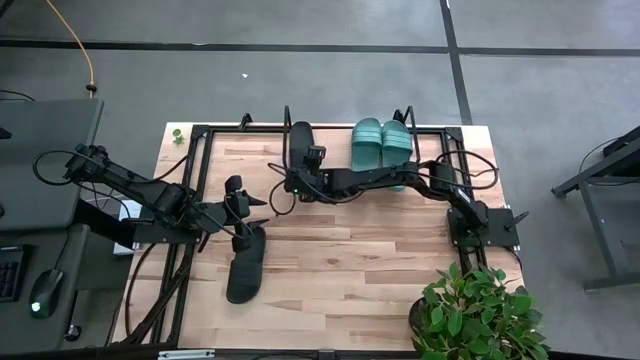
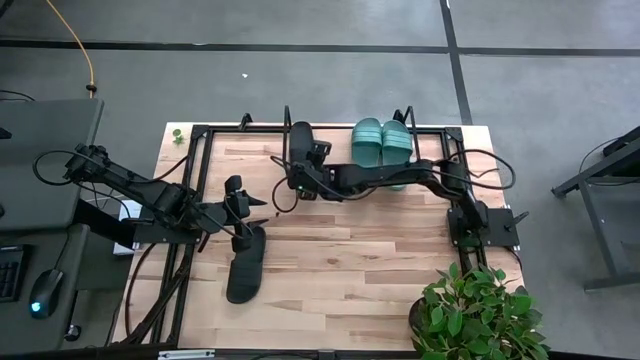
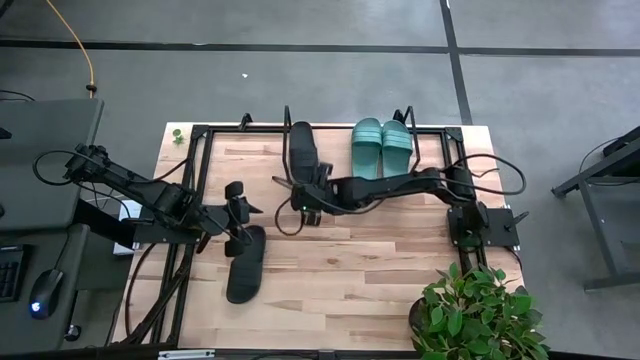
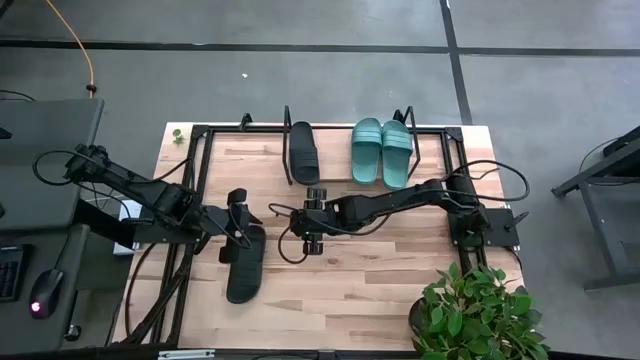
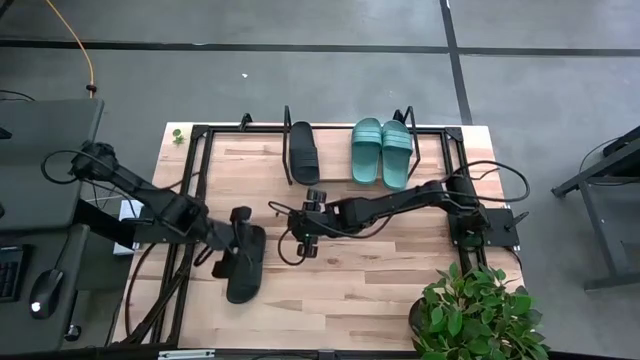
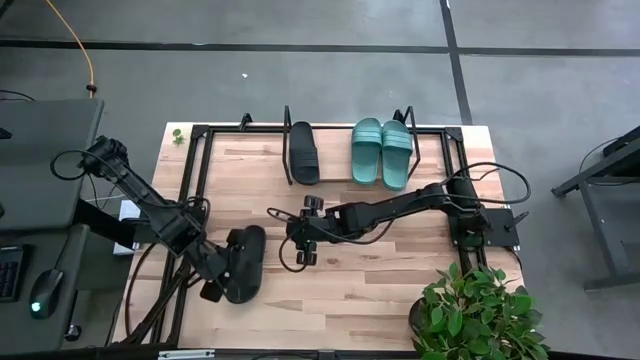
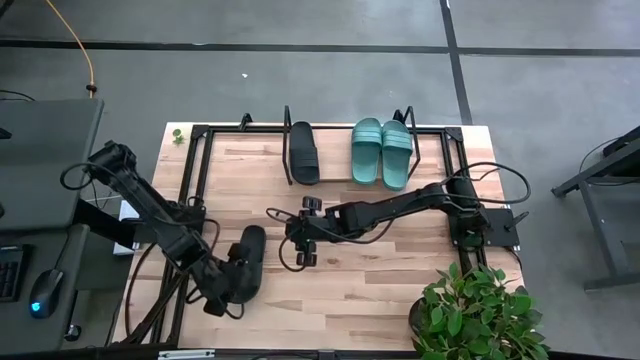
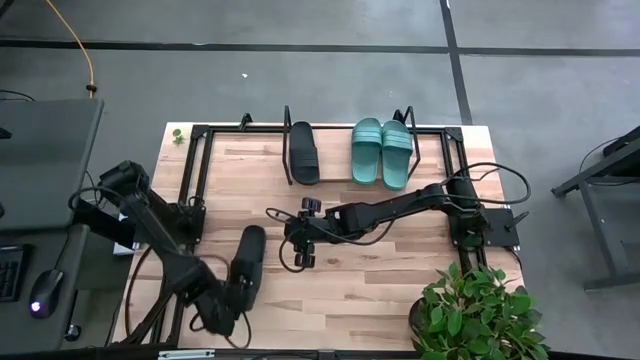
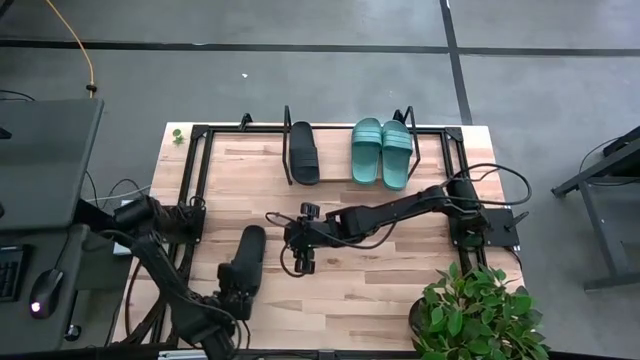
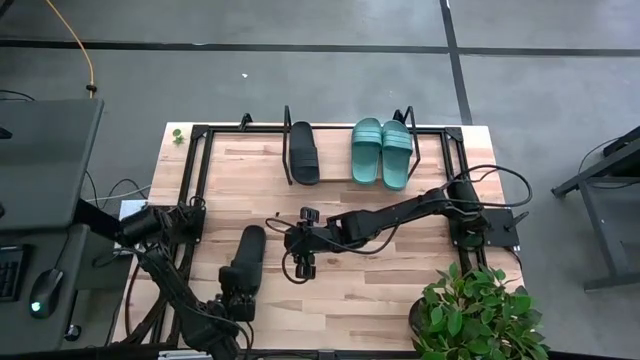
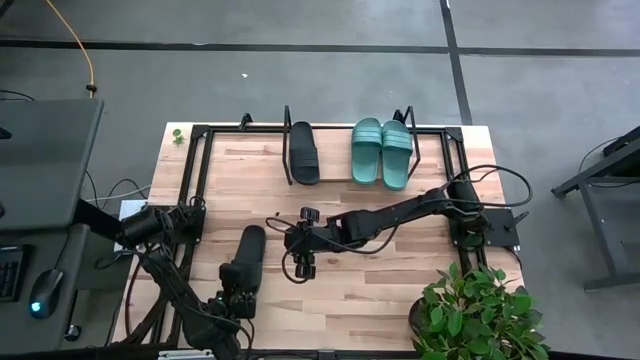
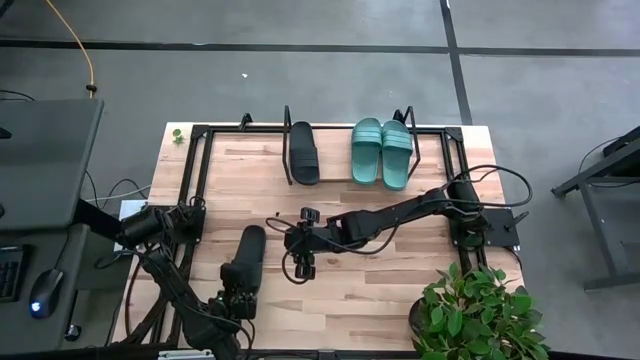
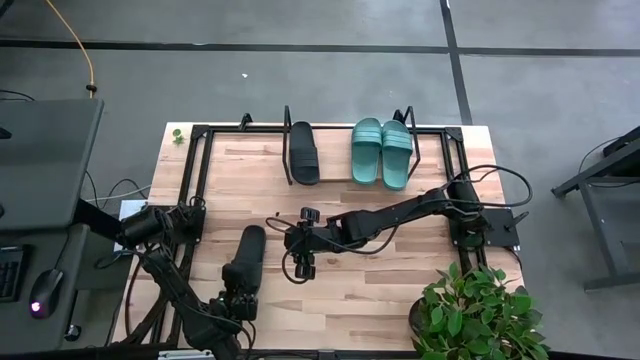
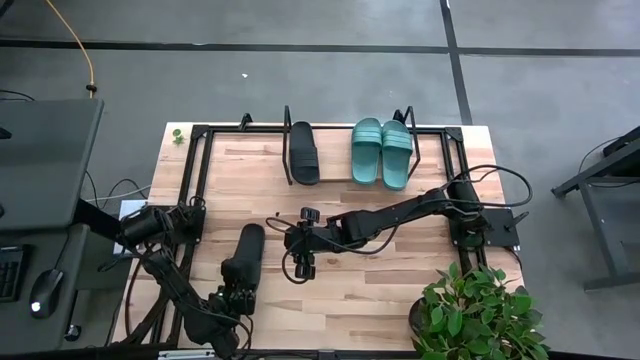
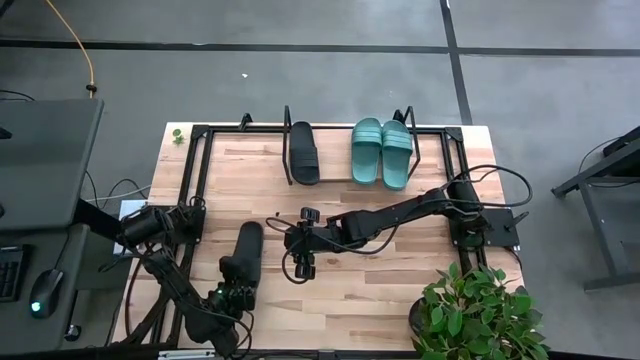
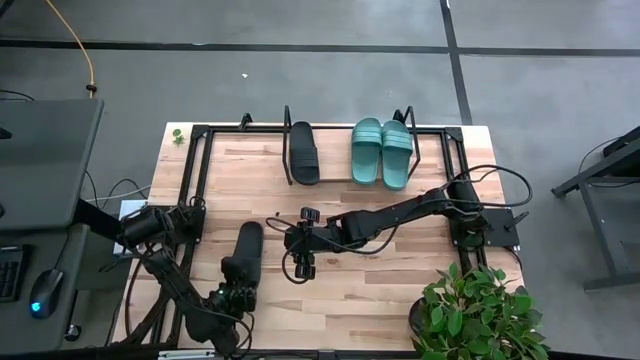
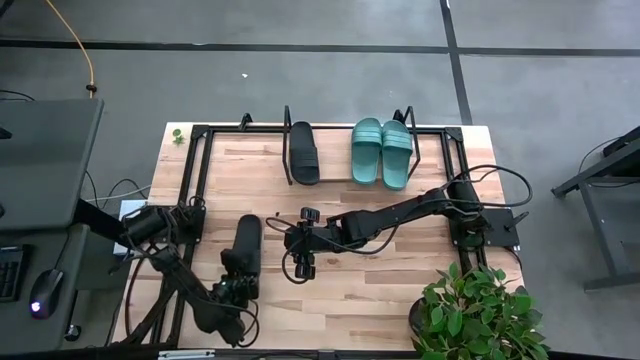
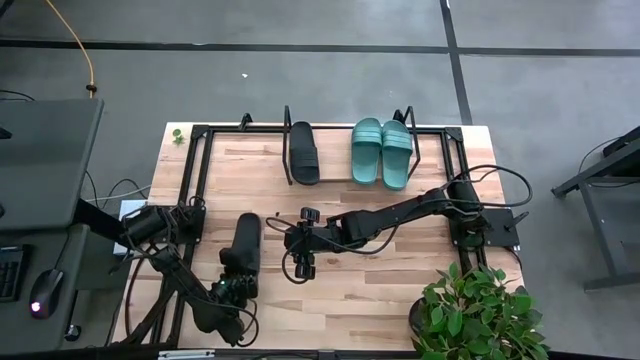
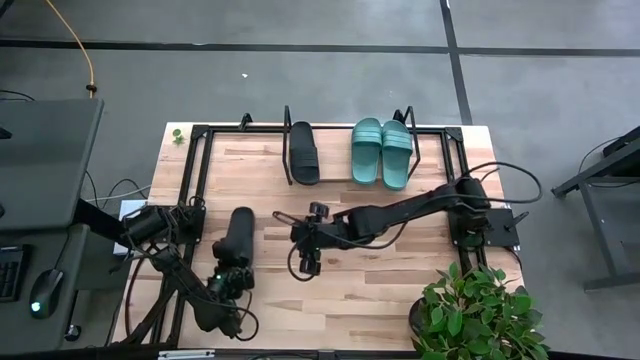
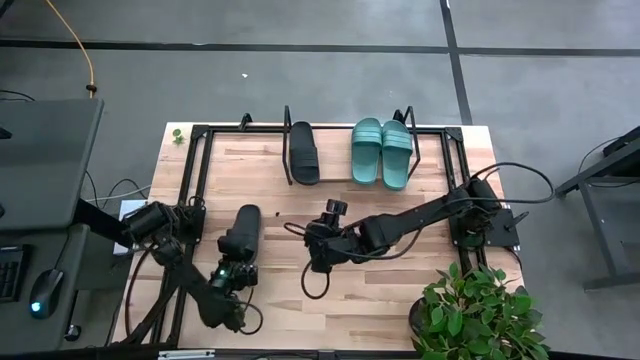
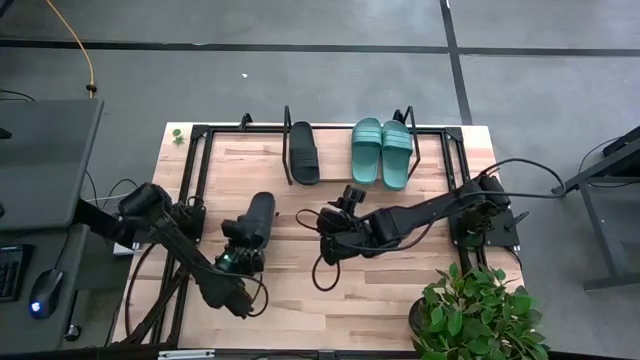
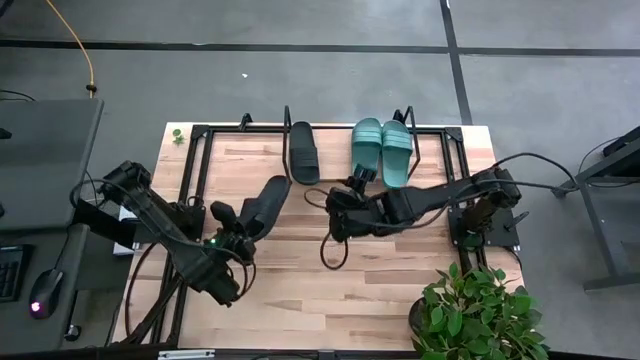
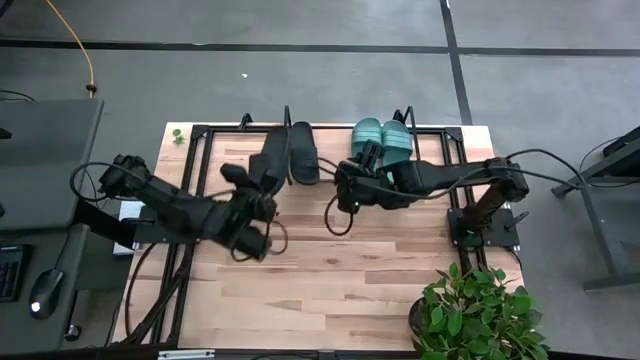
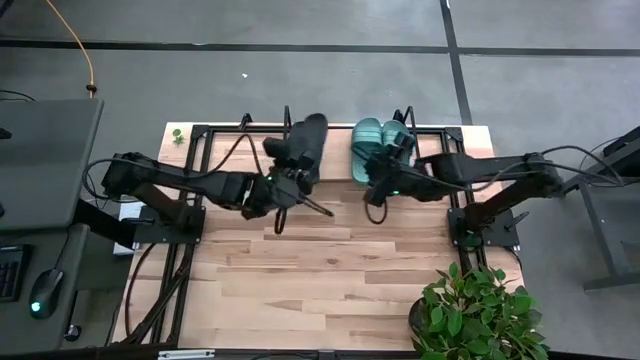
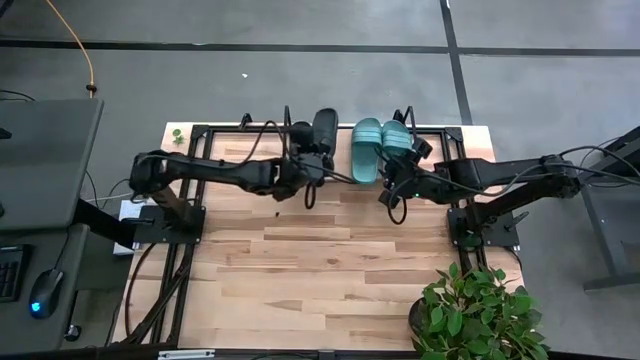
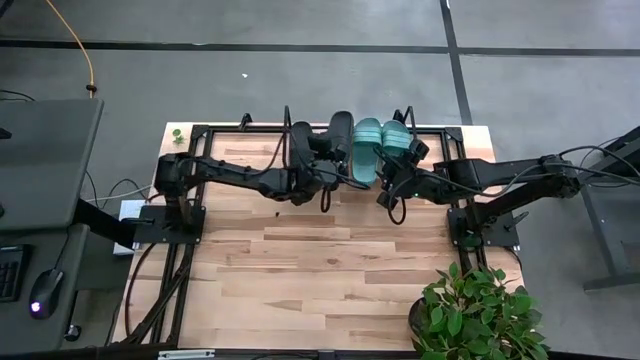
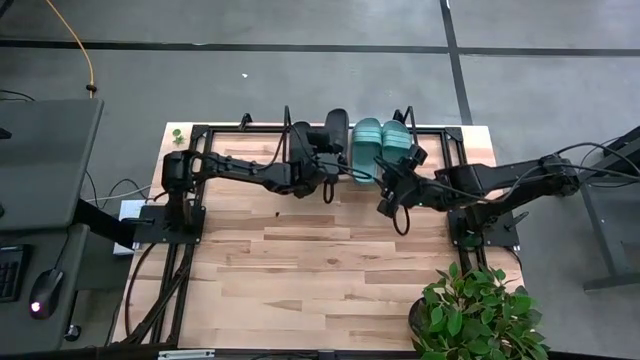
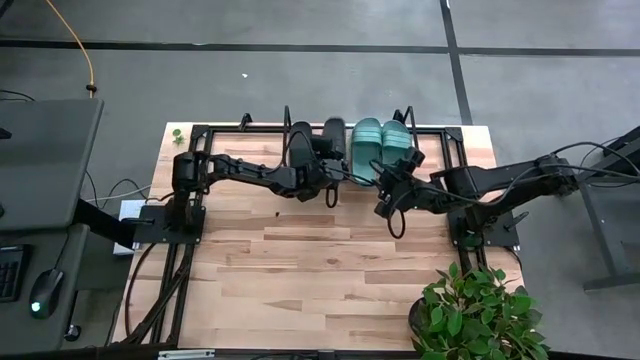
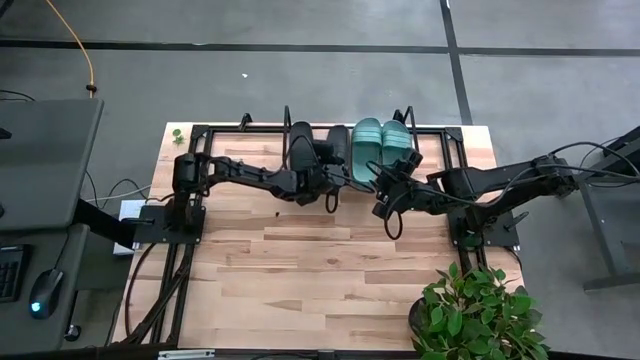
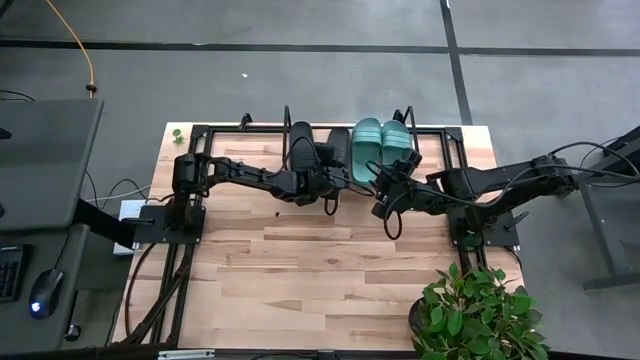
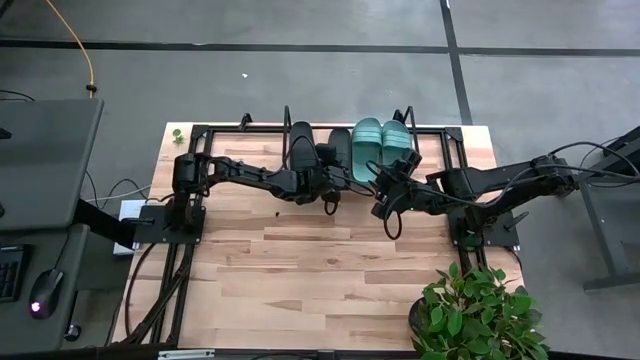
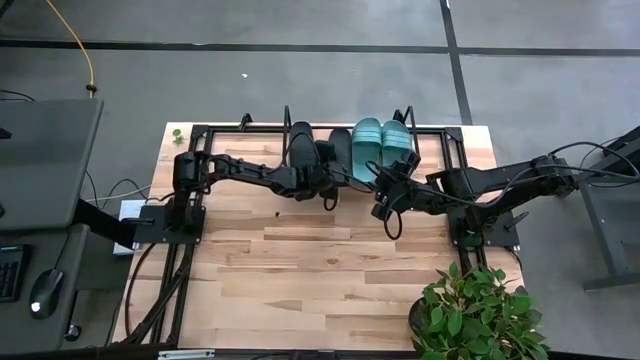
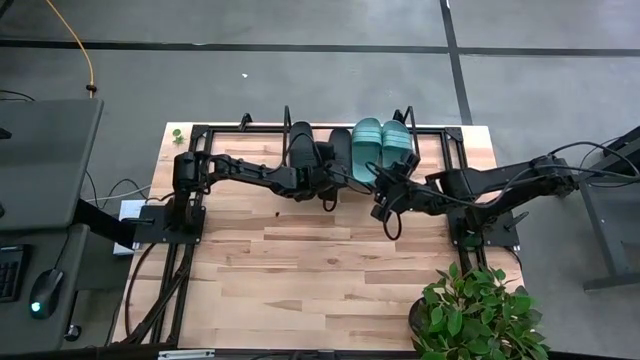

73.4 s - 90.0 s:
Task: Pick and place slides into the shelf
Put the black slide on the shelf

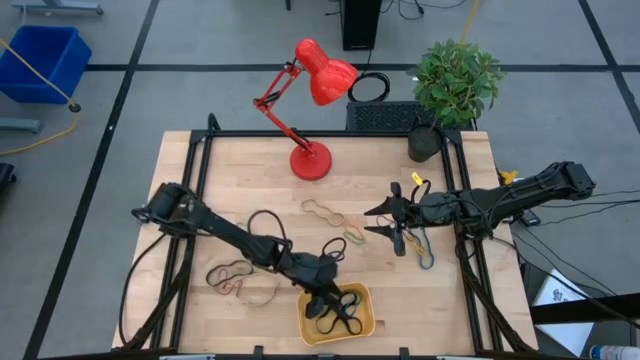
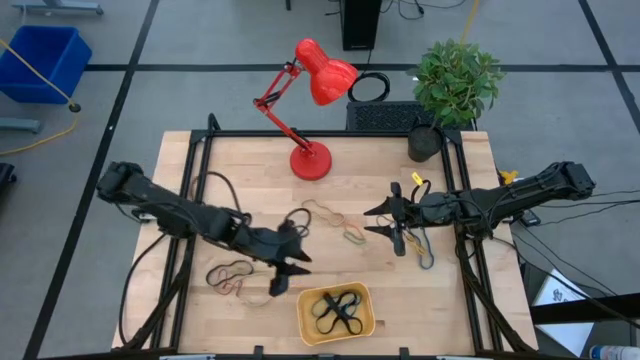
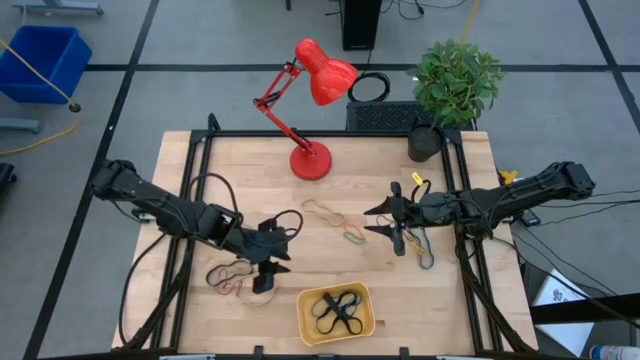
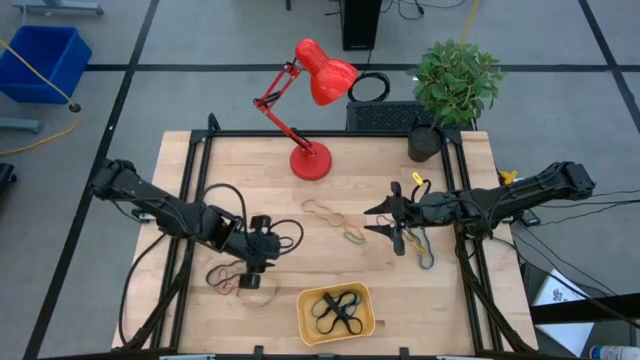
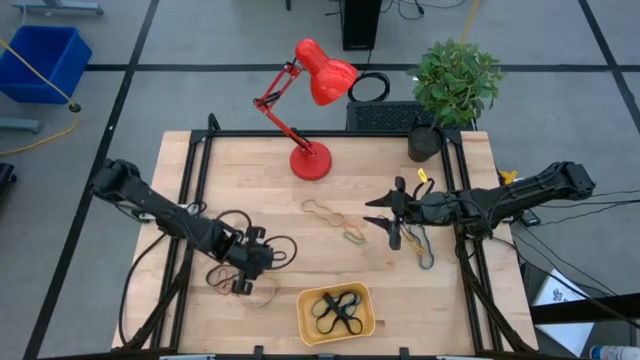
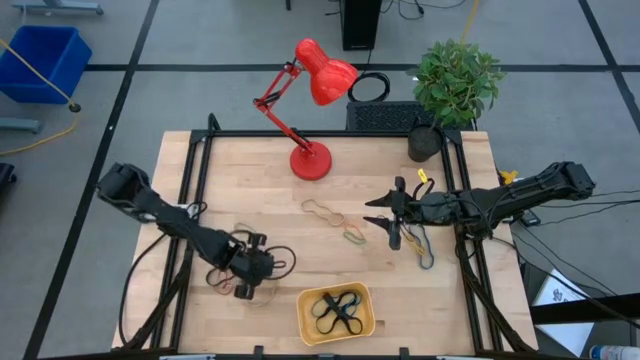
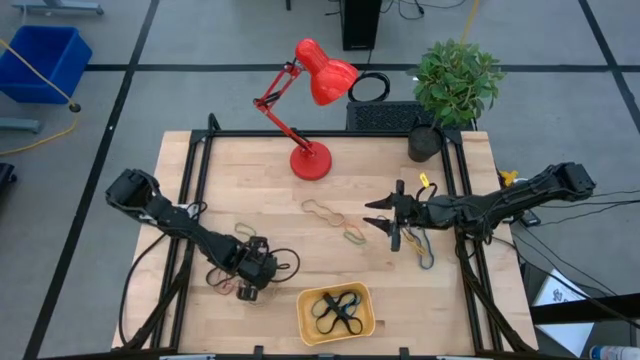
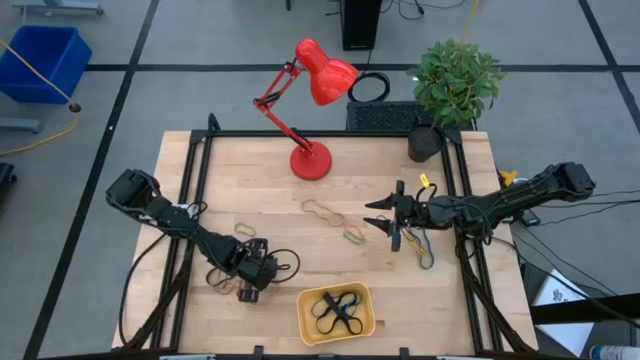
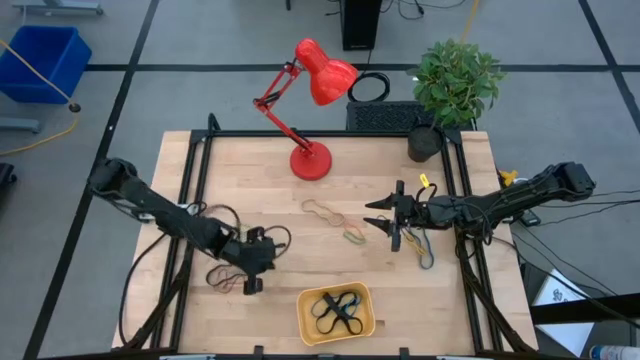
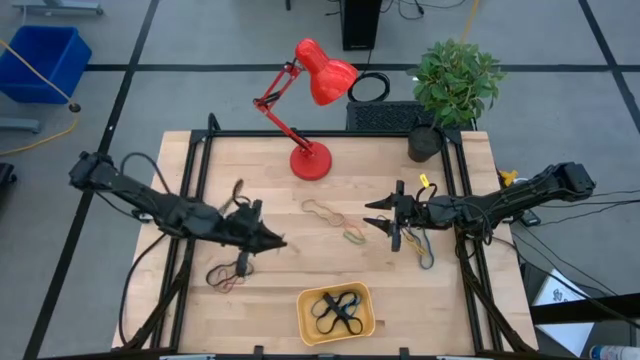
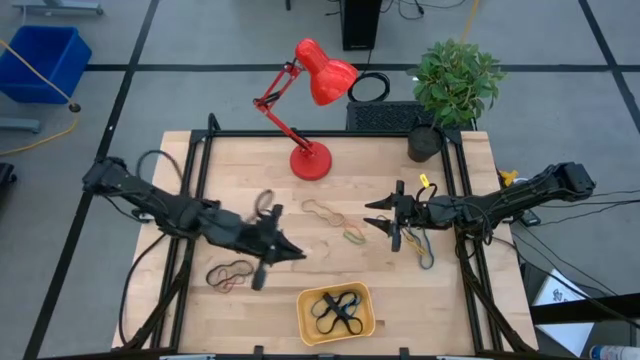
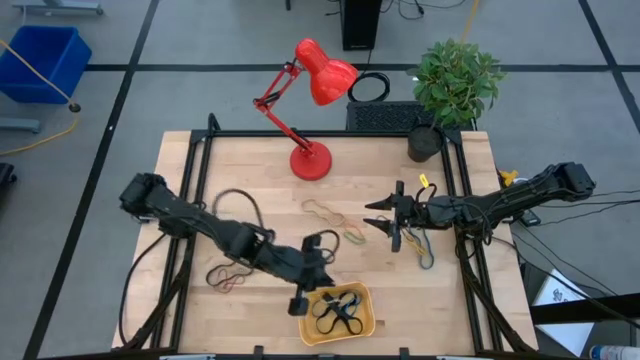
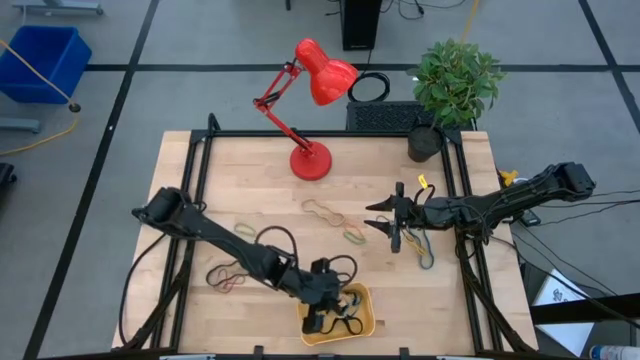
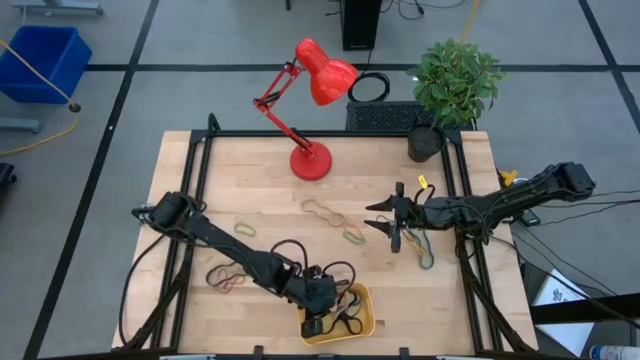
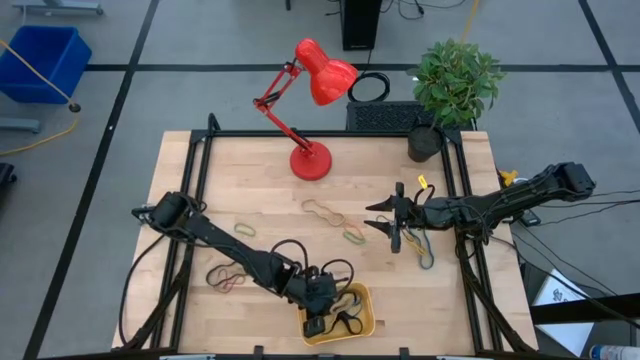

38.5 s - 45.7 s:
Task: Pick and place rubber bands into bin
Put the white rubber band into the yellow bin
